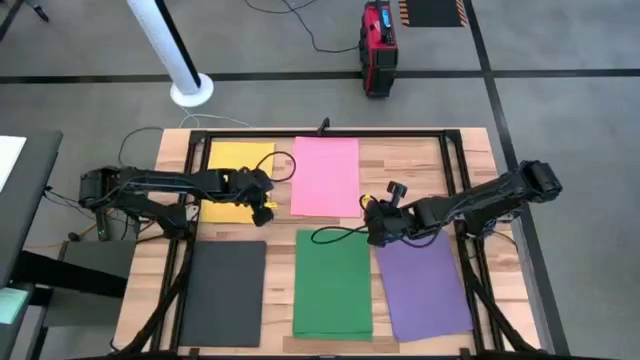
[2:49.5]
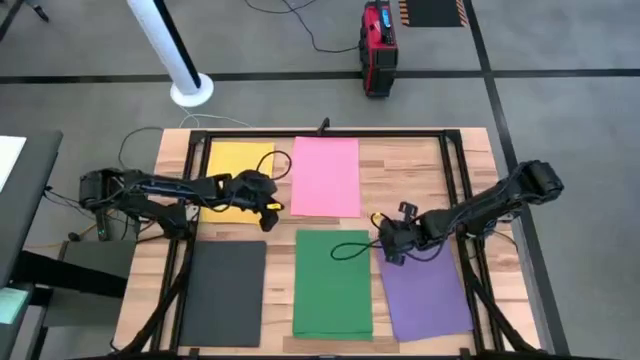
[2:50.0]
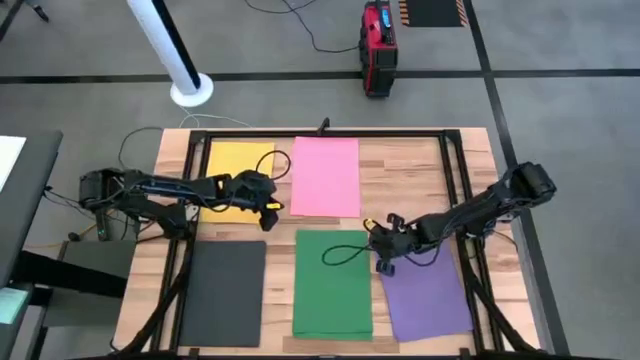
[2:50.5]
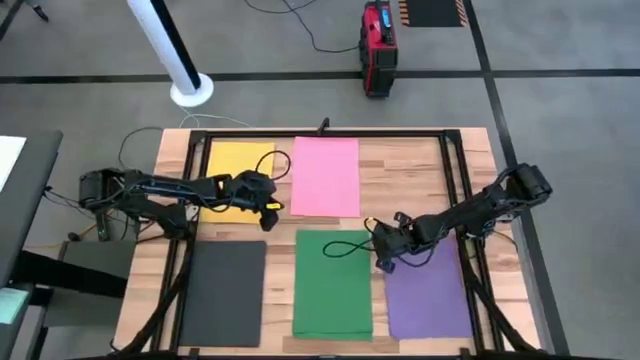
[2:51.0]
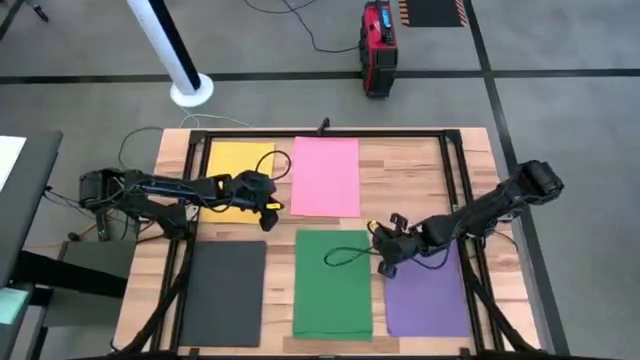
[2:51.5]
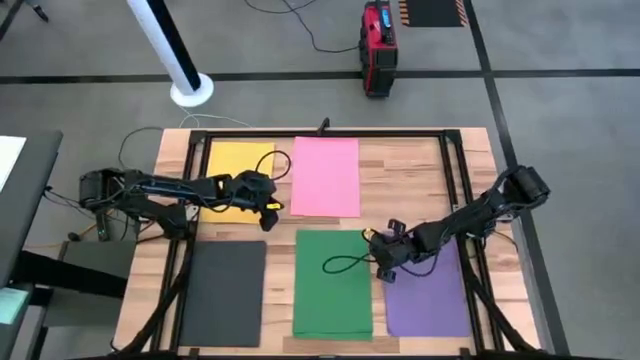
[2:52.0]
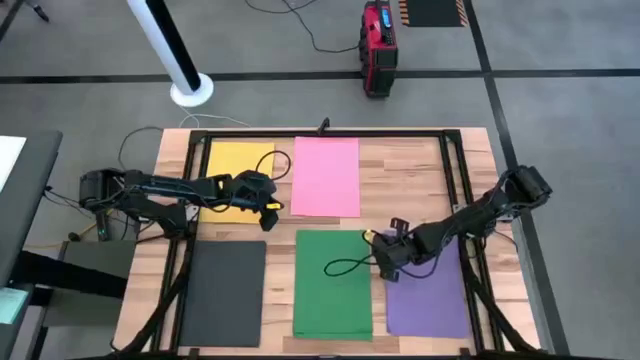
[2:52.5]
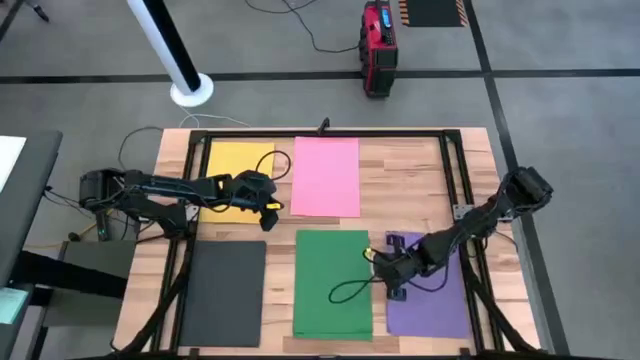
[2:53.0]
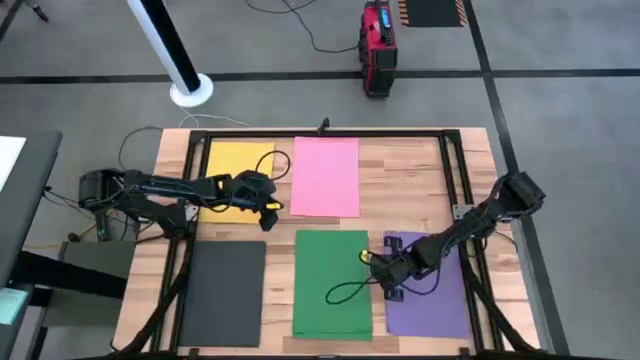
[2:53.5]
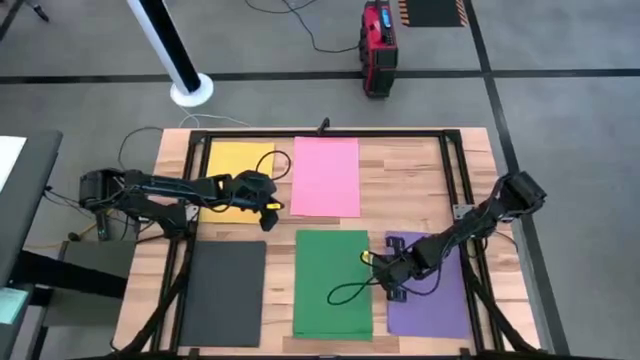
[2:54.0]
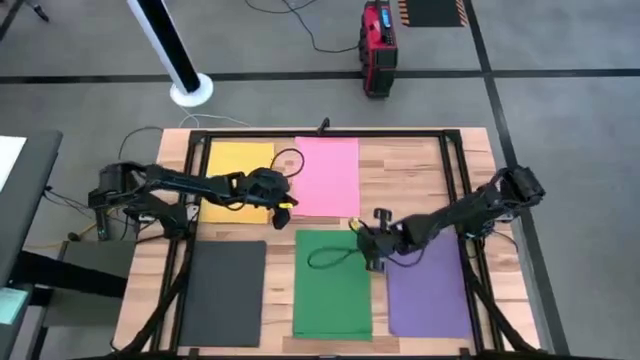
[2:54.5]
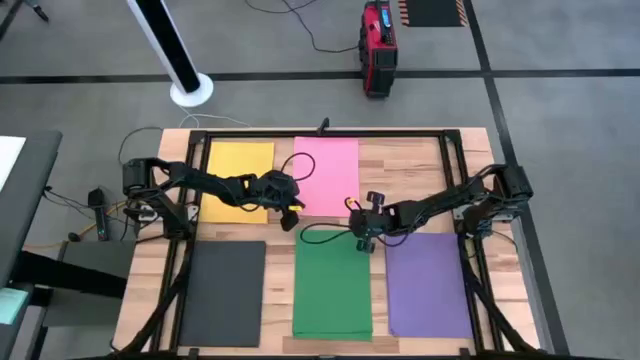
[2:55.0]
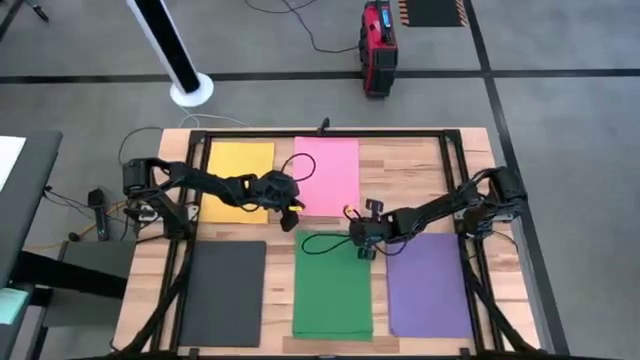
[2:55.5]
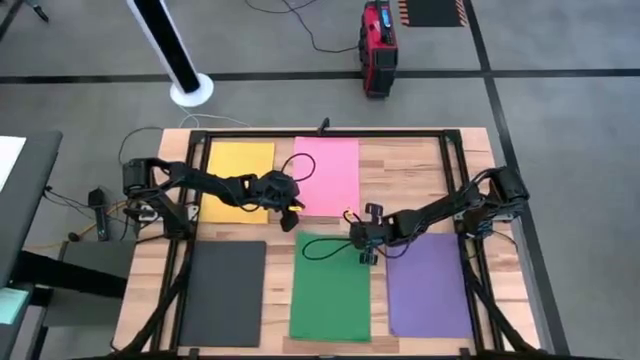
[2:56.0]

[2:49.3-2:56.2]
Task: Organize paper
Adjust the stacks of colored papers

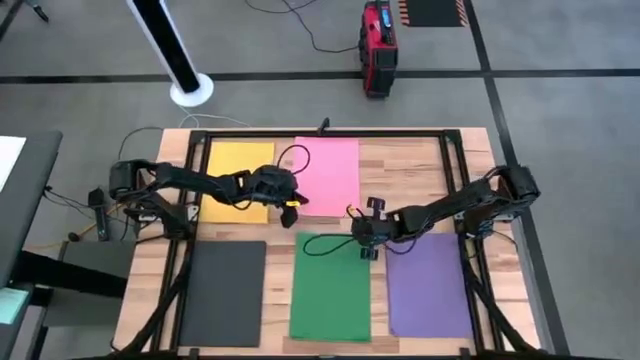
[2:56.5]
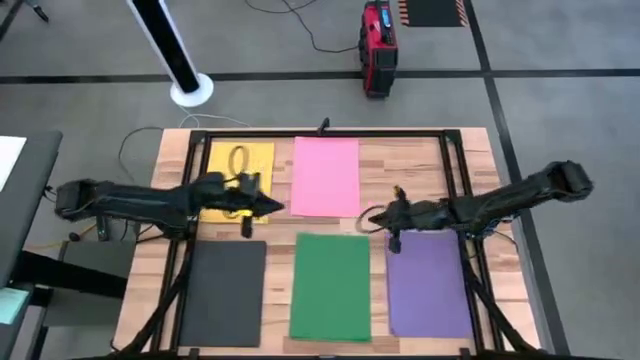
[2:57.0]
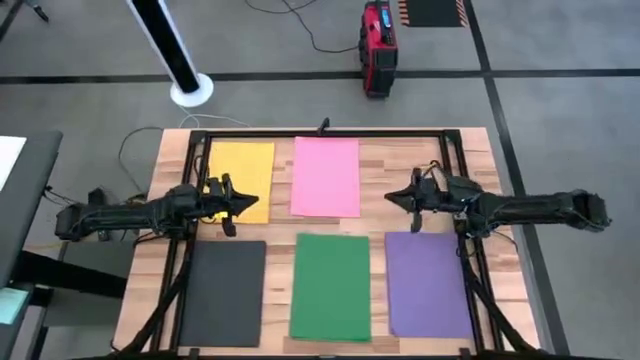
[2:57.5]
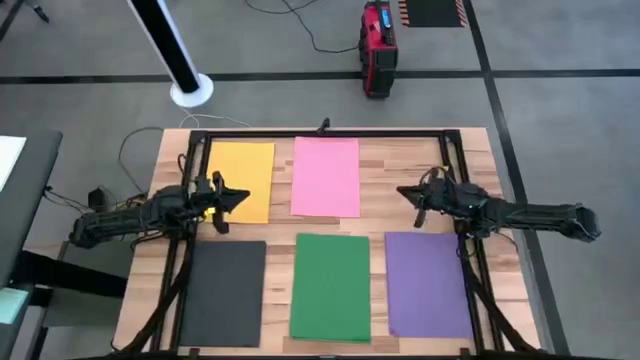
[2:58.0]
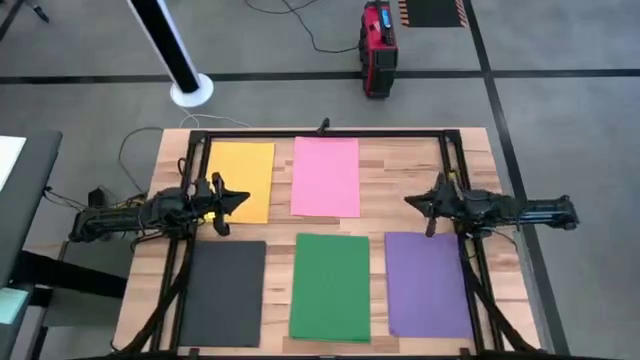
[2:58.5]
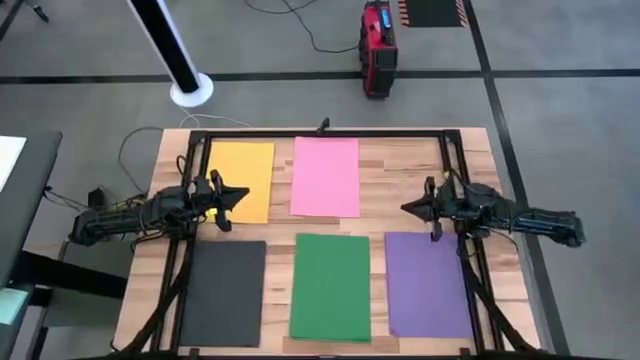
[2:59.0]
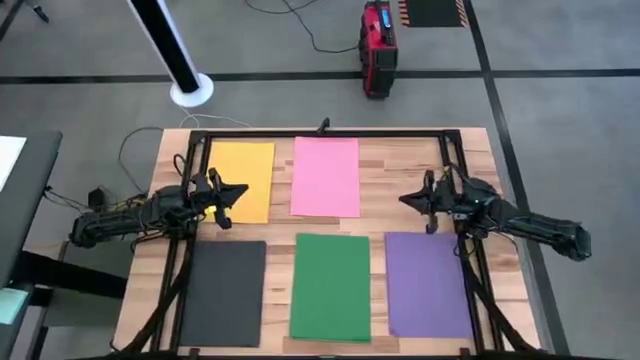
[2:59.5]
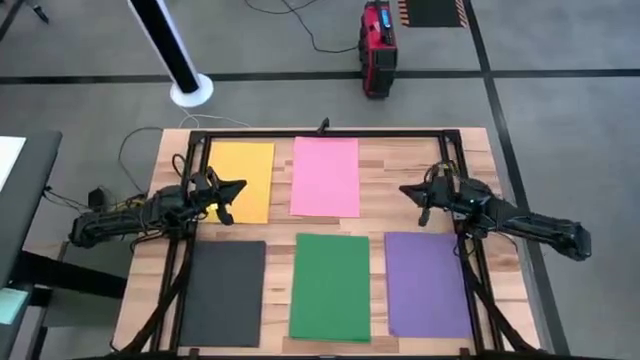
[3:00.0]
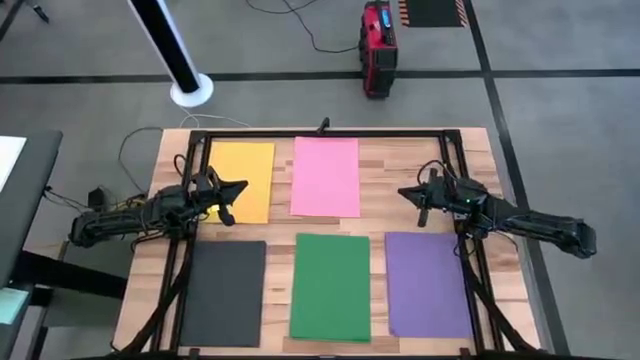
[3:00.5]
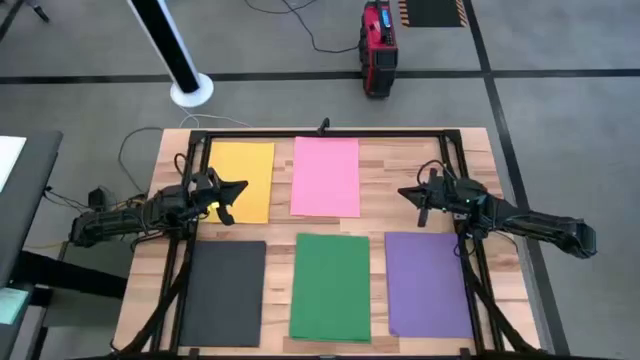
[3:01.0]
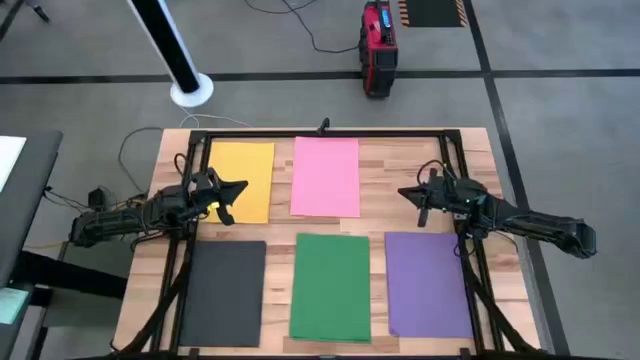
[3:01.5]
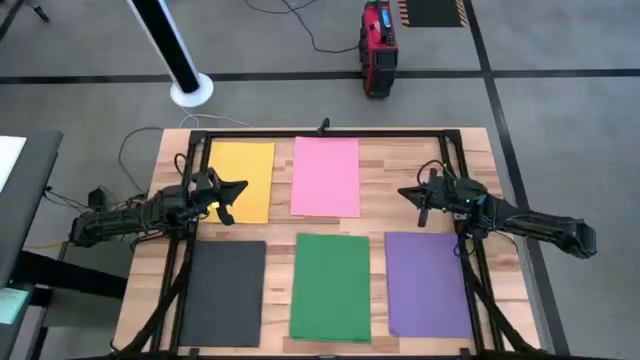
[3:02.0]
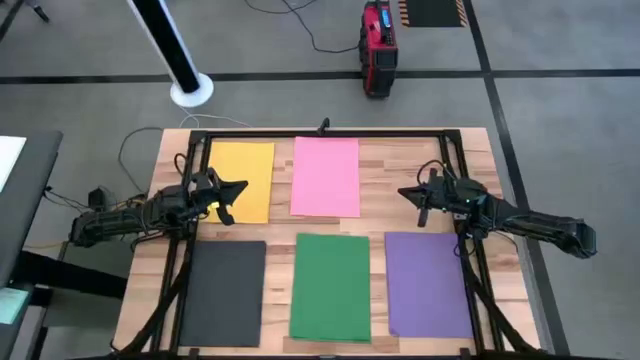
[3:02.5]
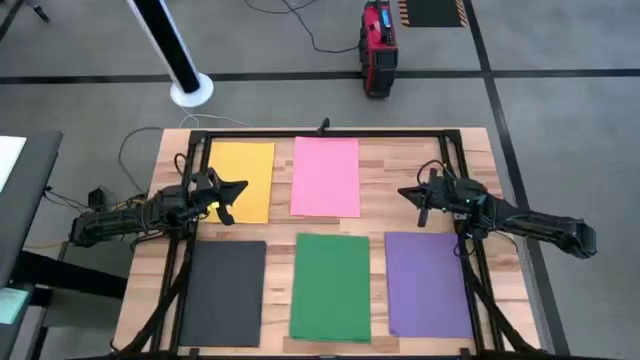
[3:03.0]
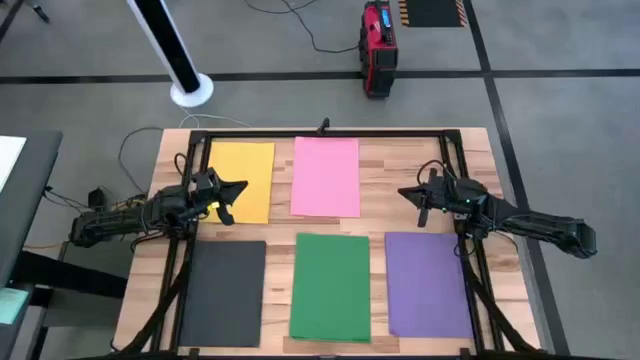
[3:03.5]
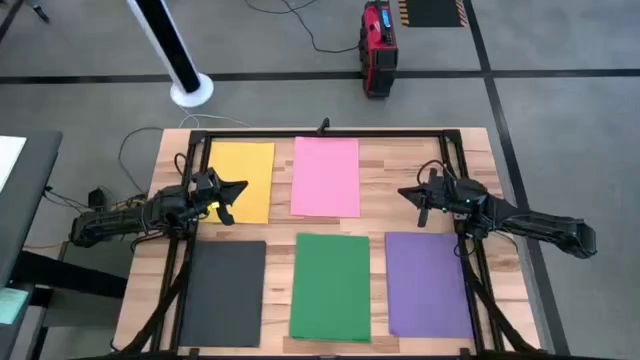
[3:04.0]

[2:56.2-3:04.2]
Return to Home Position

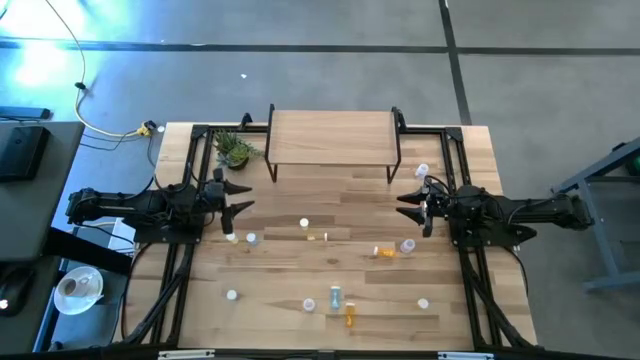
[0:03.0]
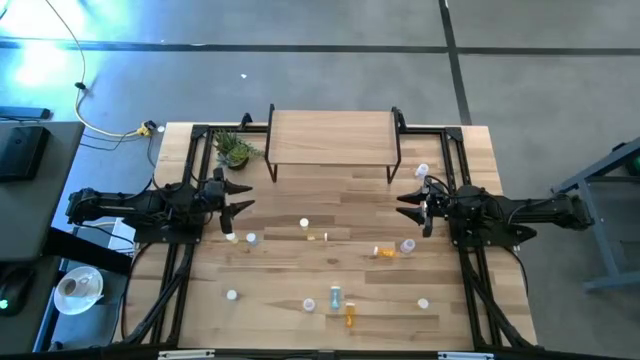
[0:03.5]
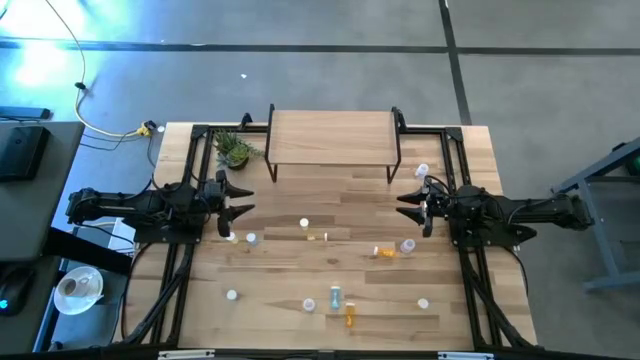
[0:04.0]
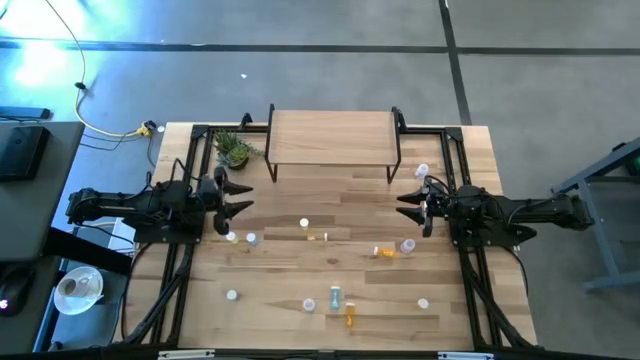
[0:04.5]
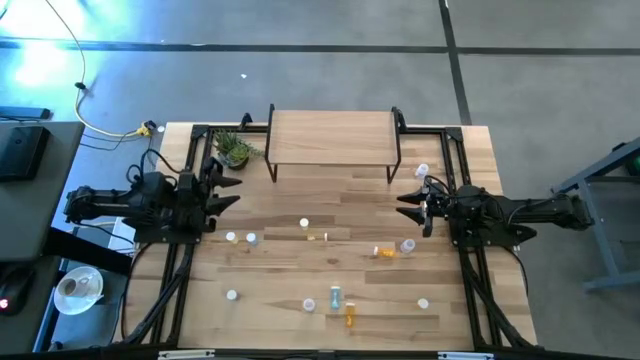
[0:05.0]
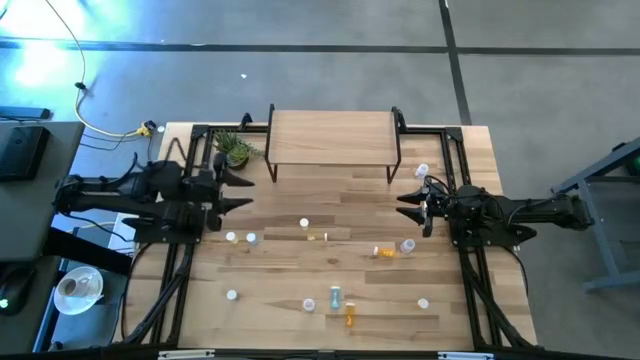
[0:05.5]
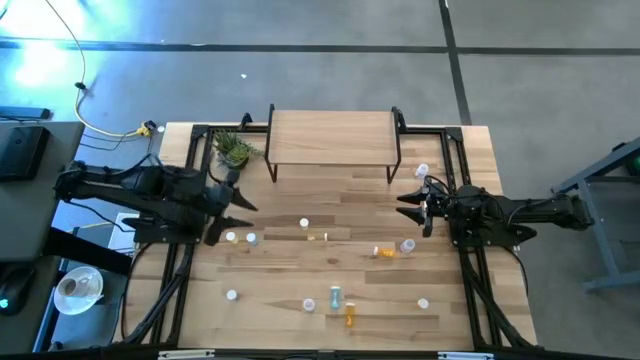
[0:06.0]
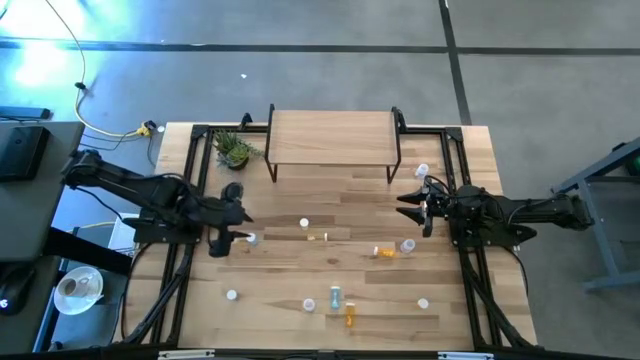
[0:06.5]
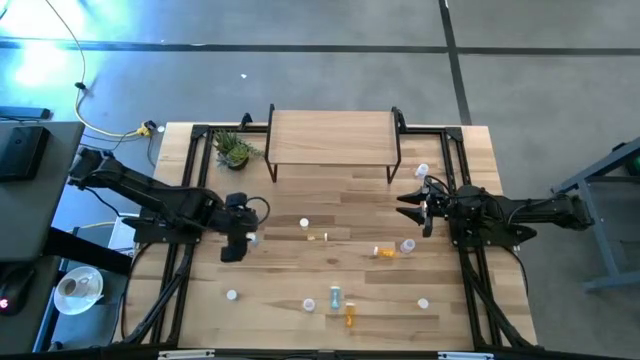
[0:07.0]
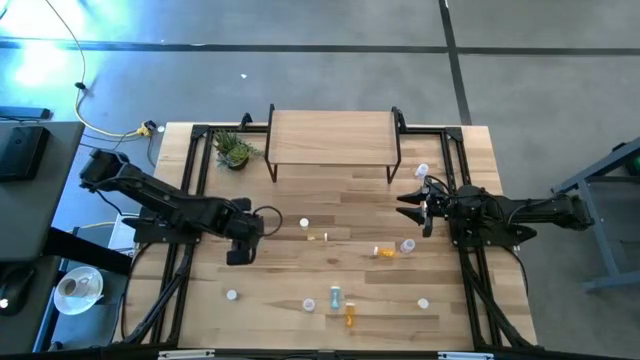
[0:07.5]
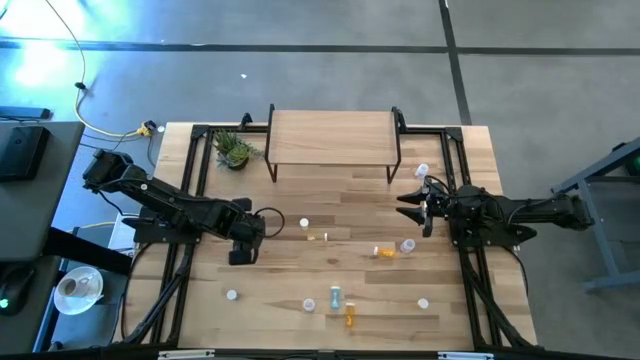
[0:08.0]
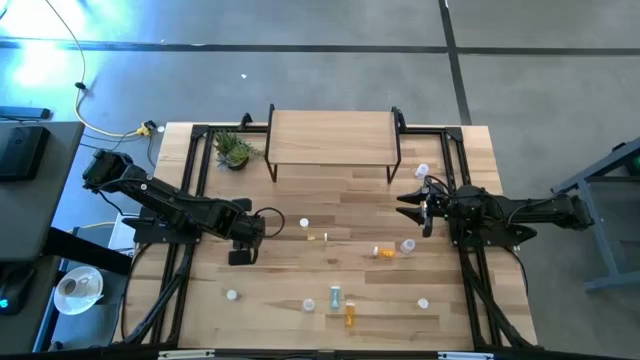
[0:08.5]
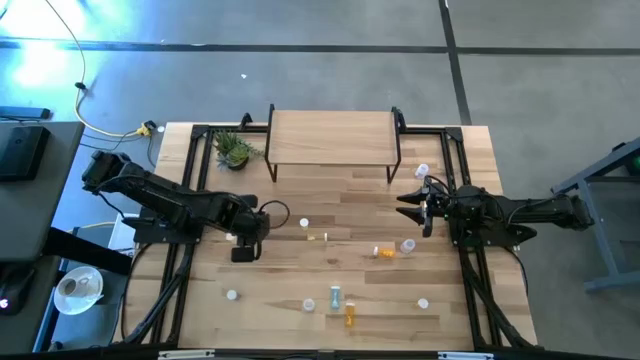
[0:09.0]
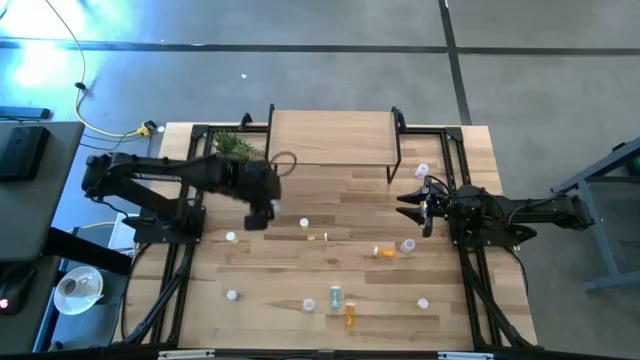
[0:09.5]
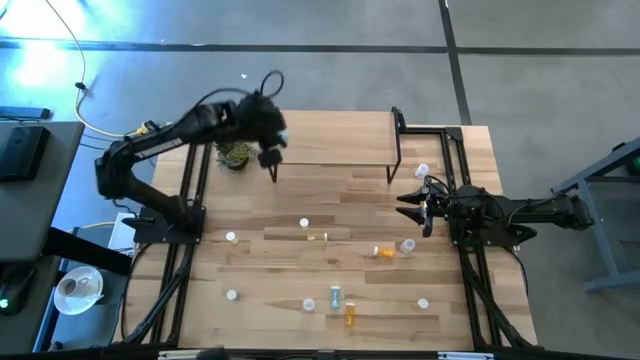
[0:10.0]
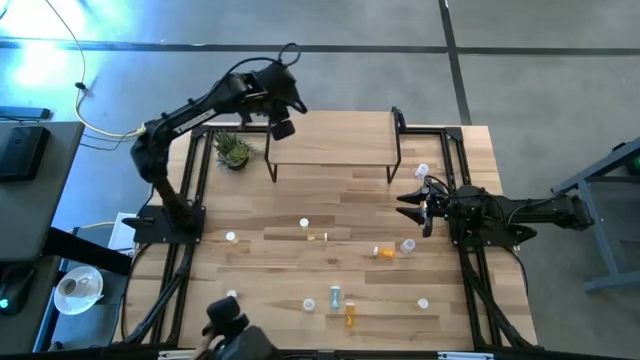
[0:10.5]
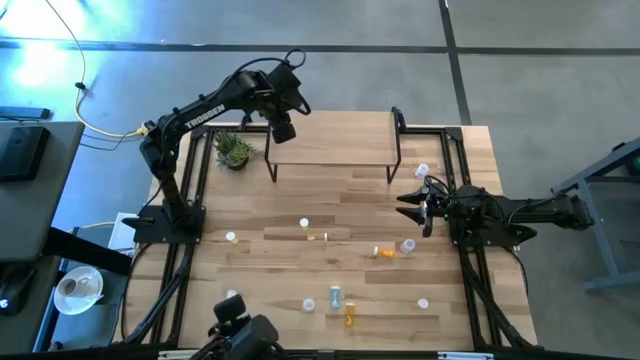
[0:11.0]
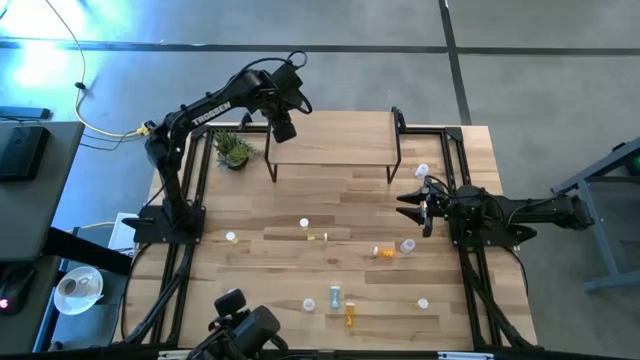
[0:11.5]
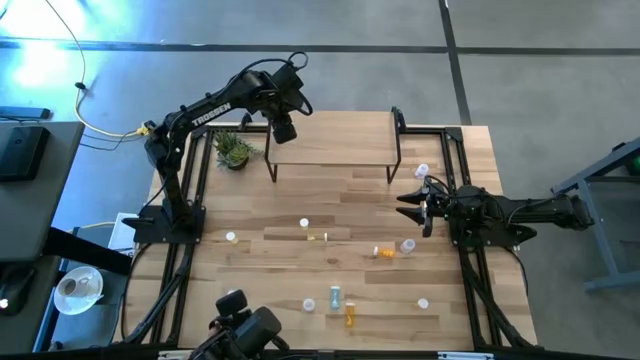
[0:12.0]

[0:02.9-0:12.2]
Task: Pick and place medicine bottles onto shelf by color
Put the top blue pill bottle on the shelf
